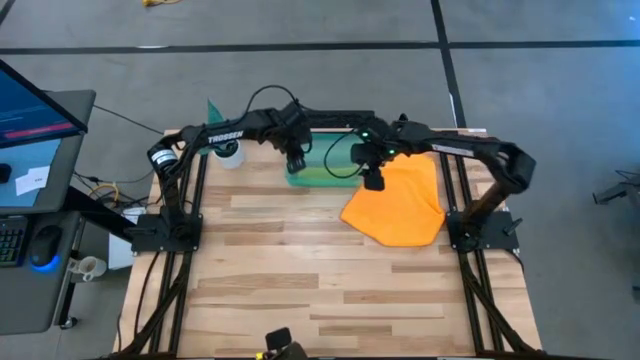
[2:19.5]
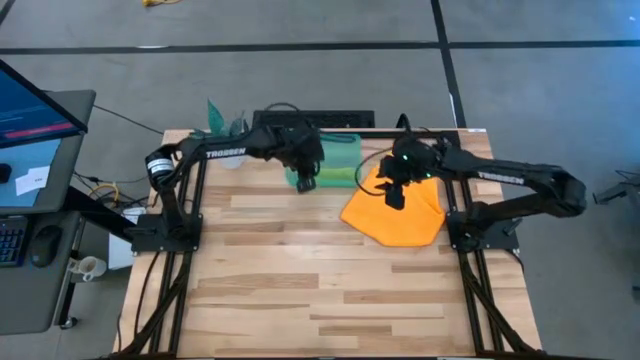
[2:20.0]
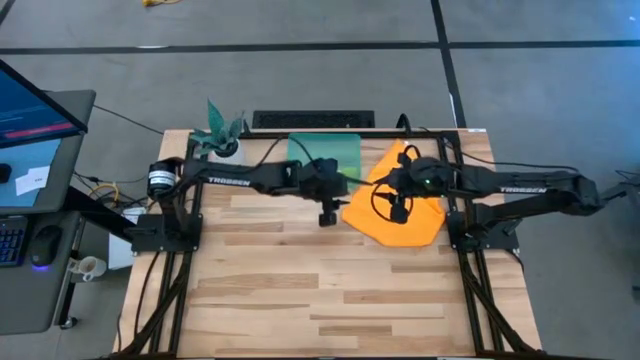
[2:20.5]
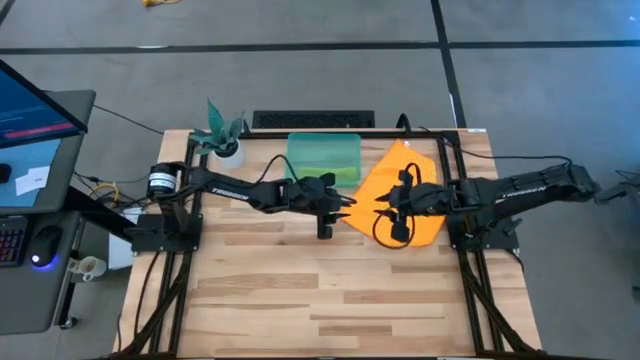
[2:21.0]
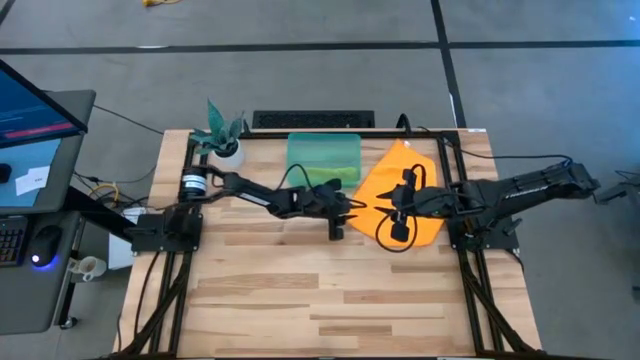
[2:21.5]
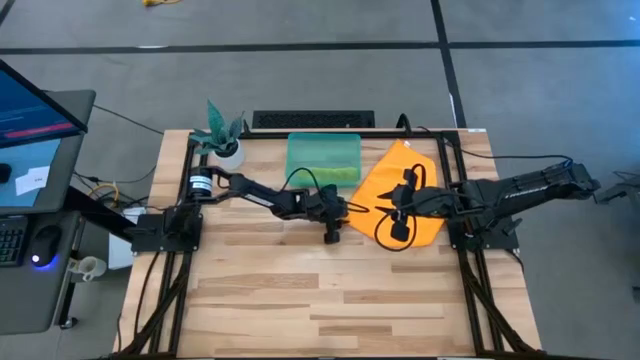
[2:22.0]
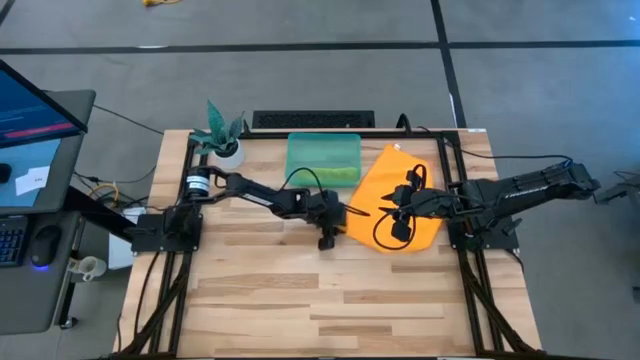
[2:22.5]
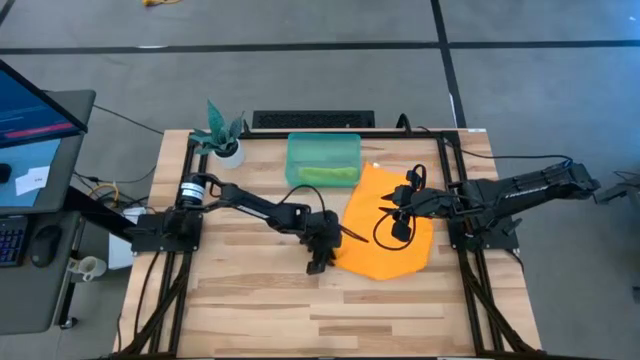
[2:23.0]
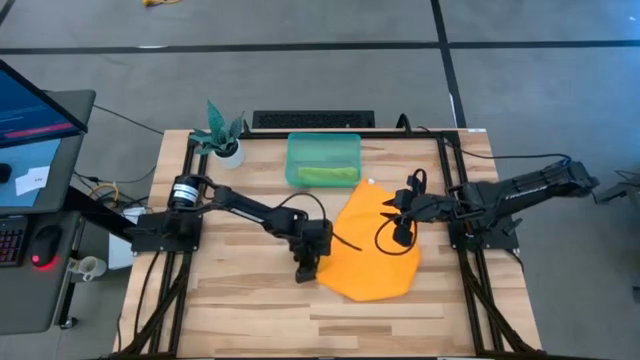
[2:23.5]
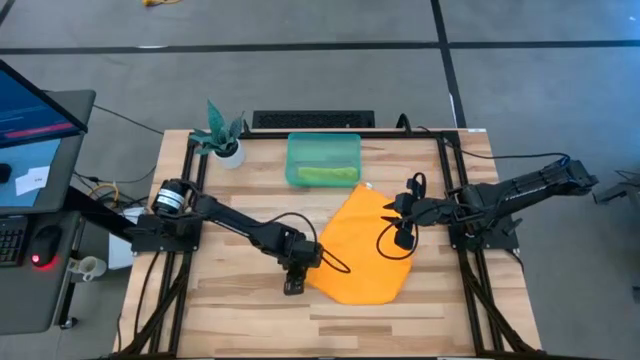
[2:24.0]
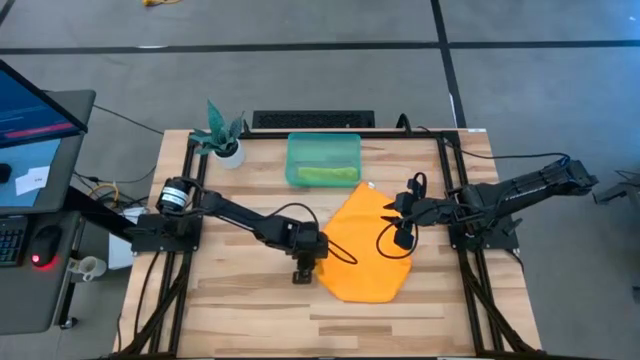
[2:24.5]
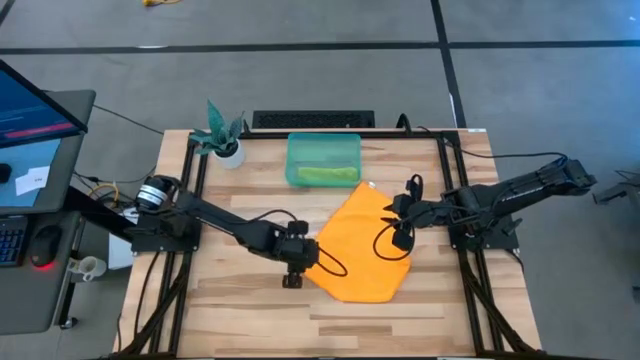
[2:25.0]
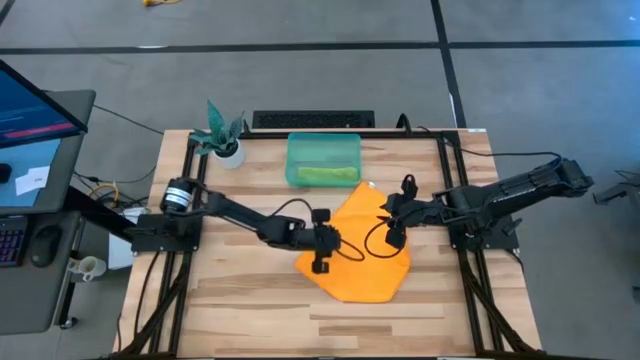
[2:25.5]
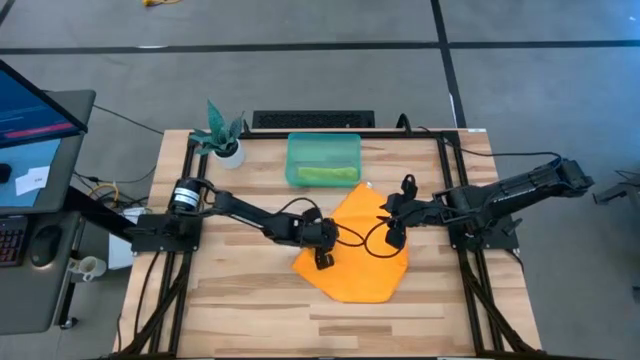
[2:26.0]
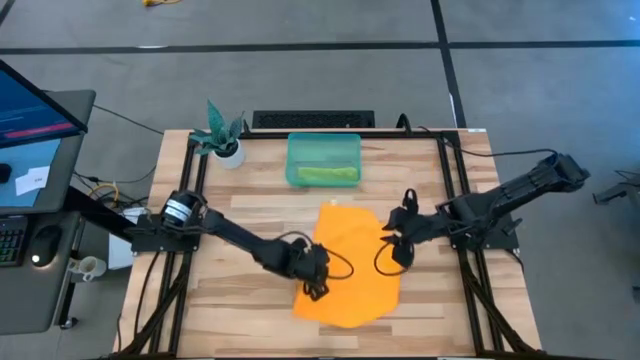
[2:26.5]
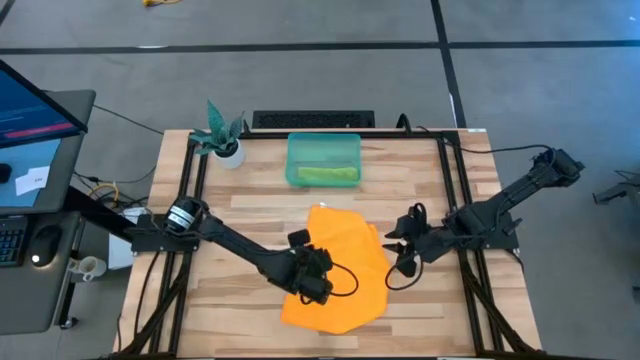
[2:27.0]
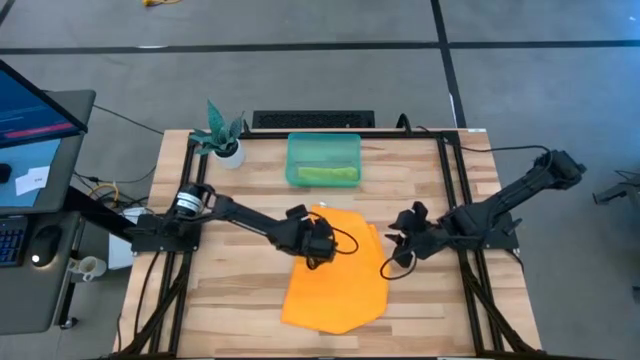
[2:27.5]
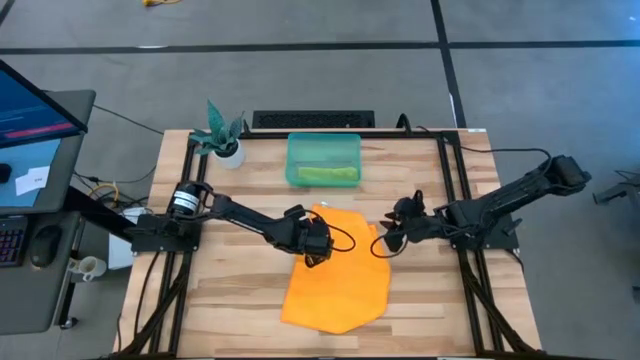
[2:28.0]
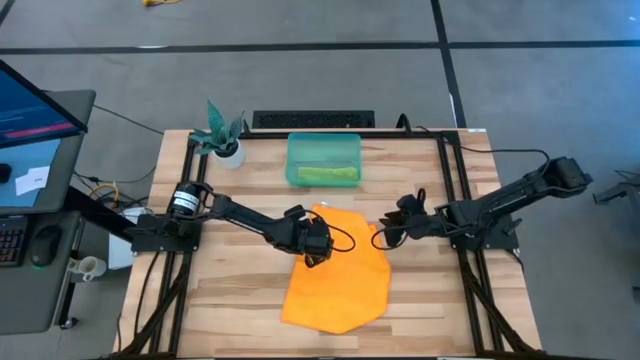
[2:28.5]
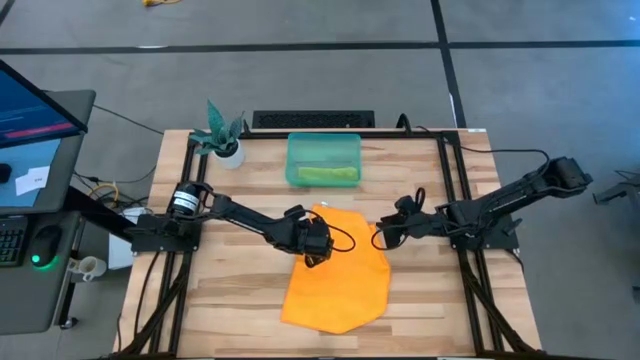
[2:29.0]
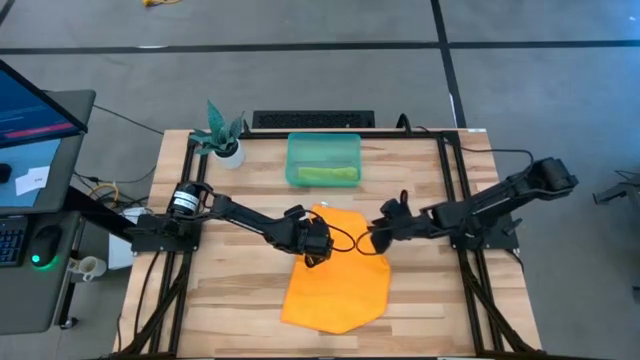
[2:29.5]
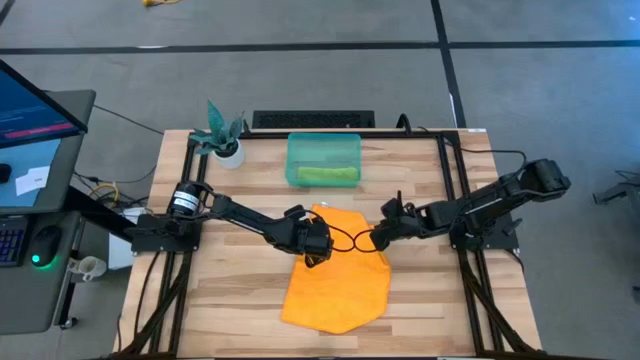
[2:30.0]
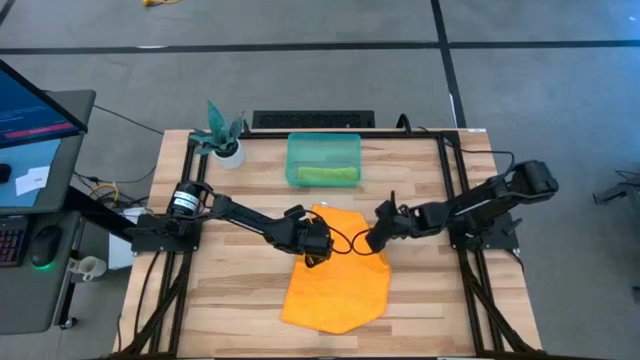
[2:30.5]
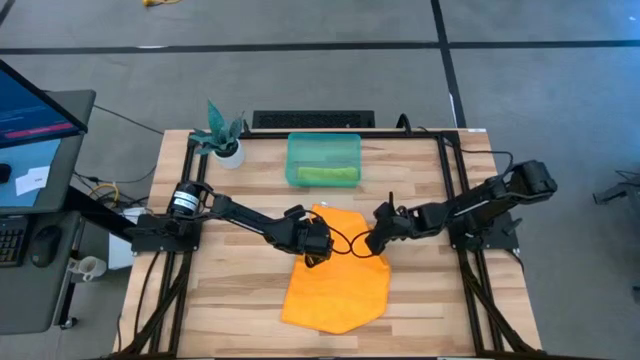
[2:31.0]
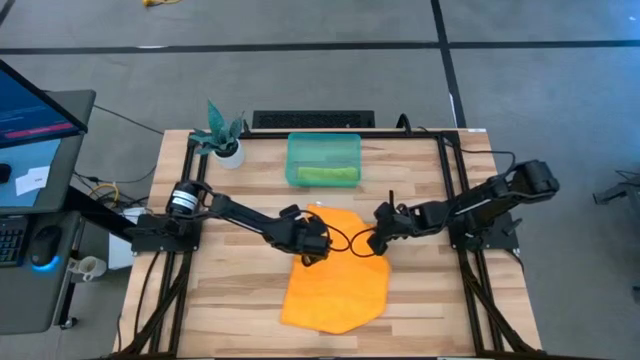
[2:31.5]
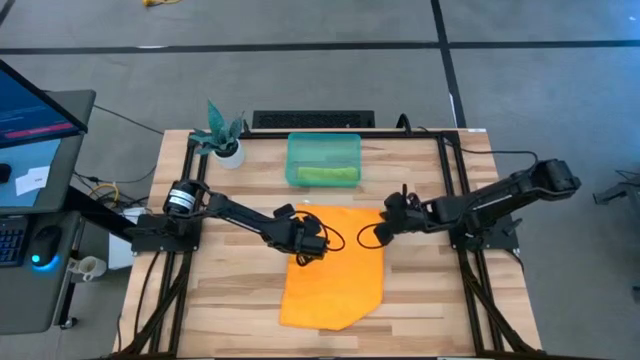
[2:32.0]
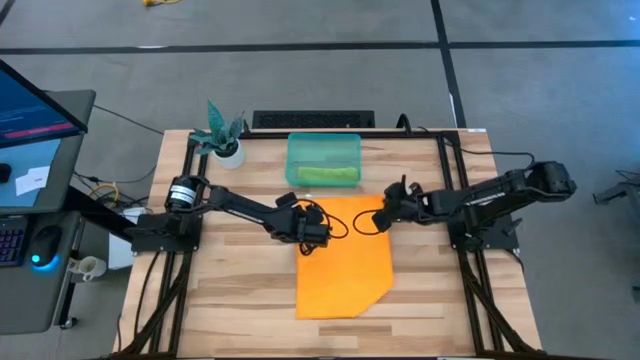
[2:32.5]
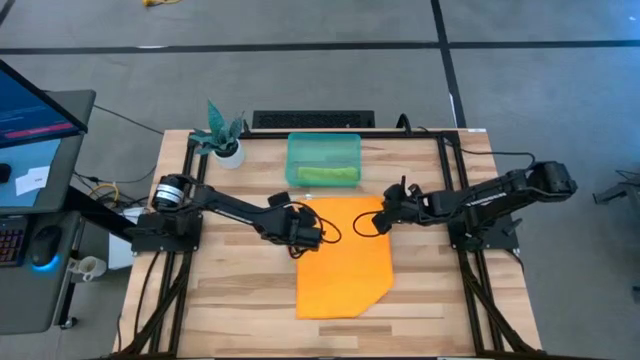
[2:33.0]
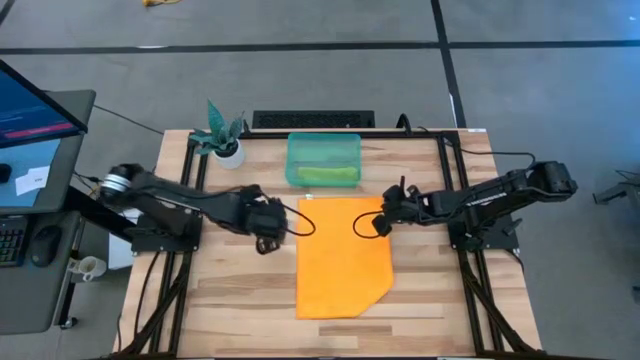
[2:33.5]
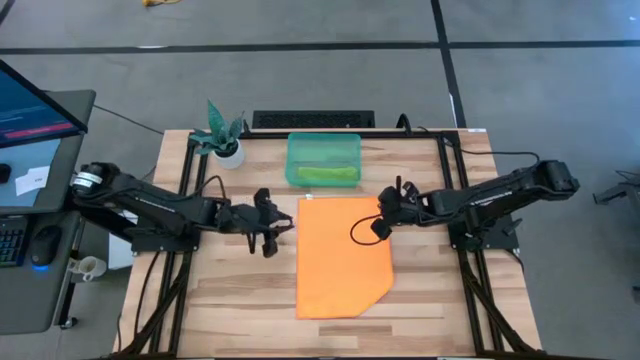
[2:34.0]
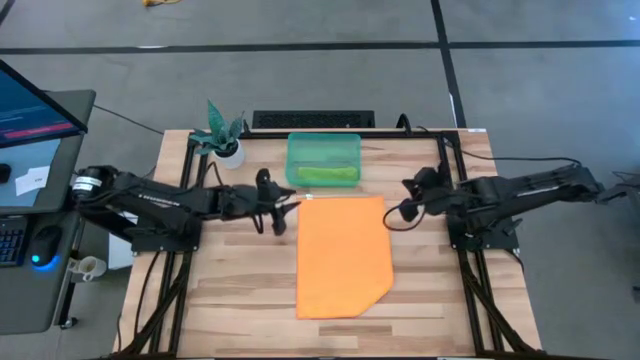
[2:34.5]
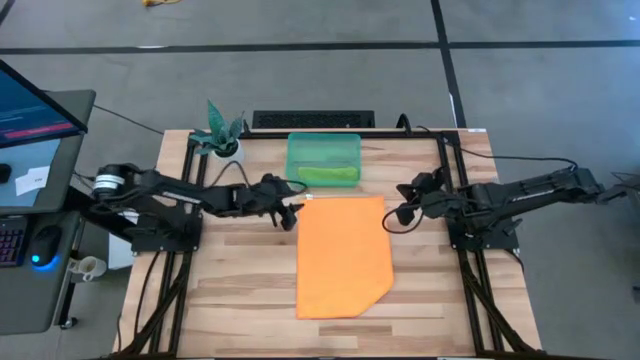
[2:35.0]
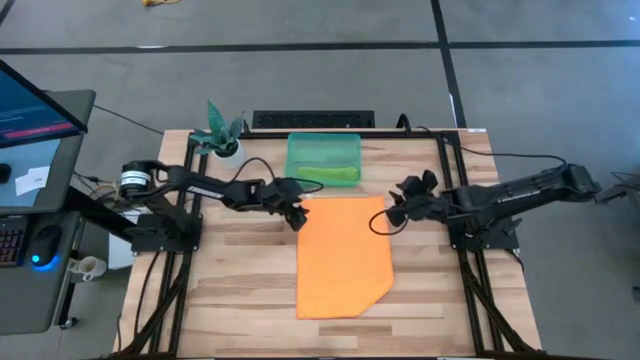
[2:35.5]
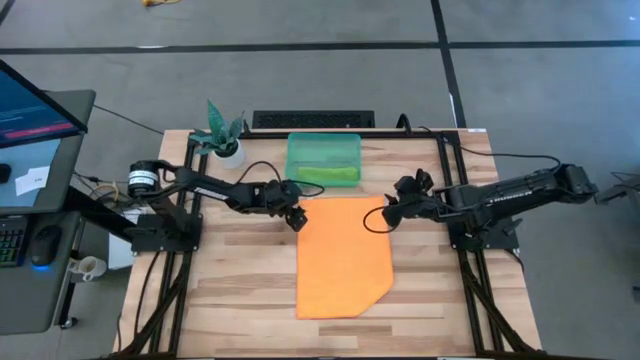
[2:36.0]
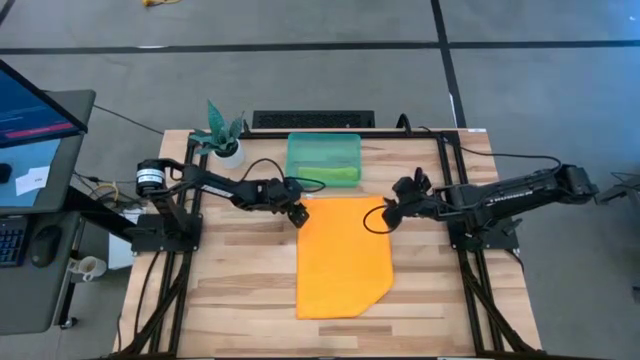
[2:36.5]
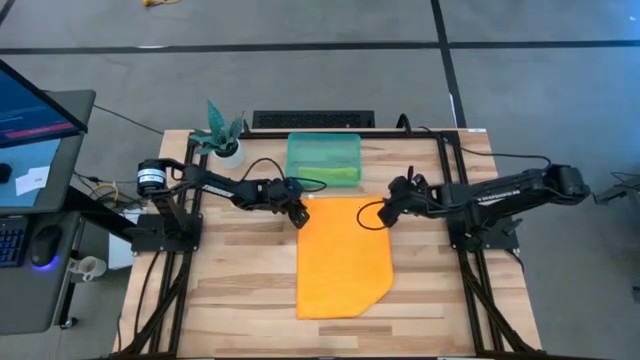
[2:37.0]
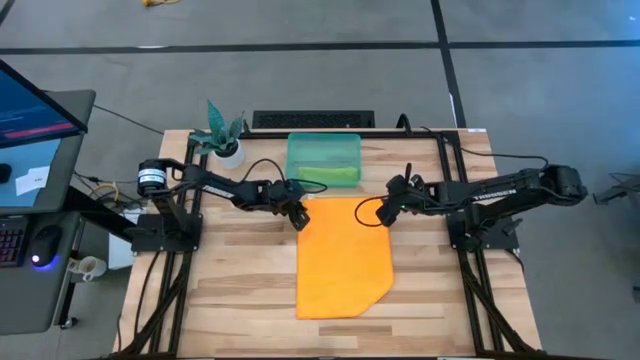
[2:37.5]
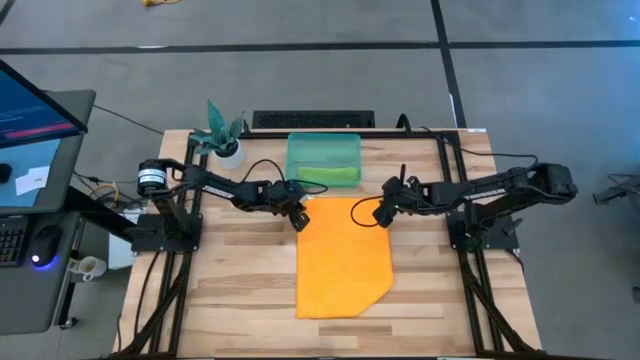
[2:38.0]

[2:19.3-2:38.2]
Task: Roll microfiber towels into tight, uniform cylinder then place into a basket
Fold the orange towel
